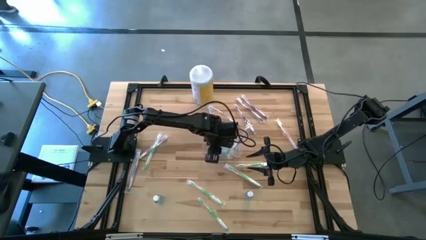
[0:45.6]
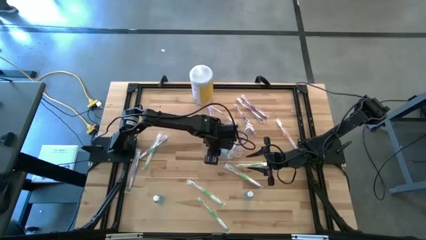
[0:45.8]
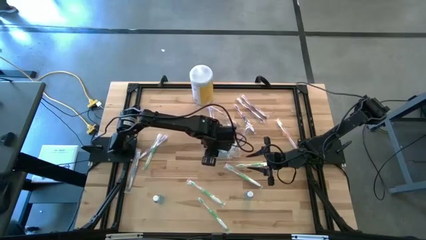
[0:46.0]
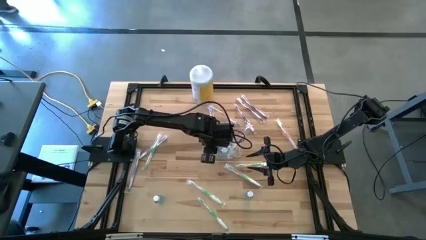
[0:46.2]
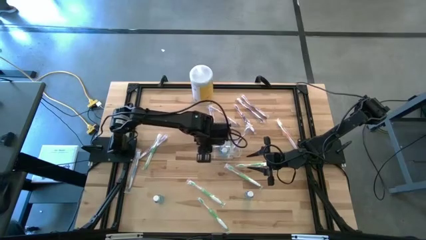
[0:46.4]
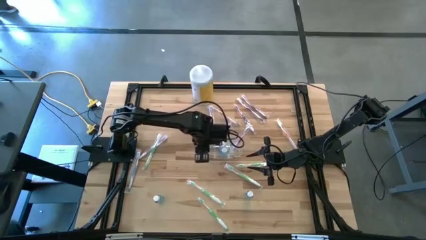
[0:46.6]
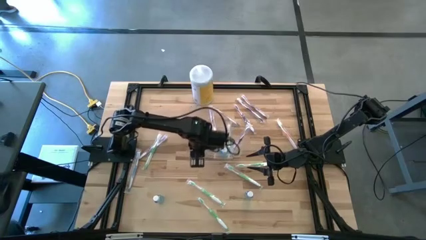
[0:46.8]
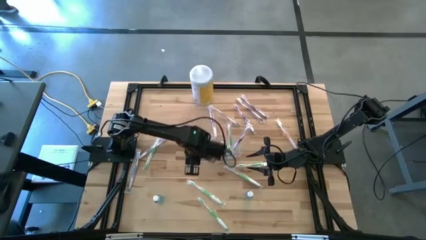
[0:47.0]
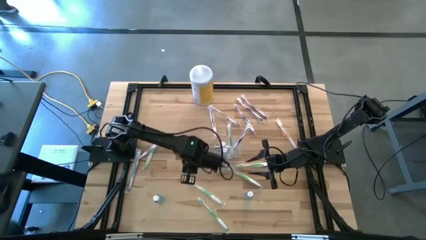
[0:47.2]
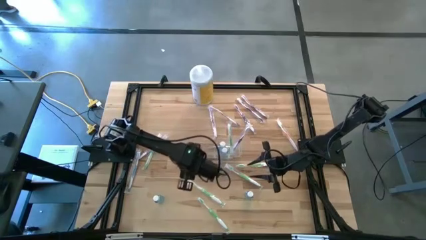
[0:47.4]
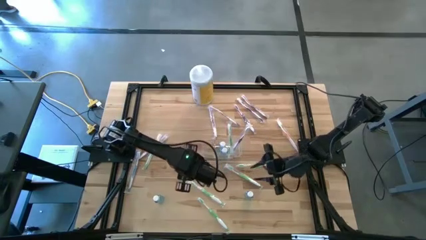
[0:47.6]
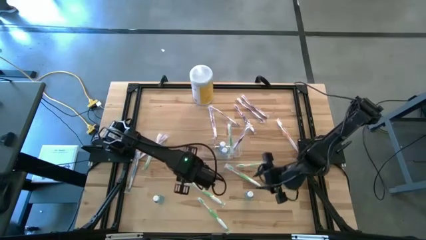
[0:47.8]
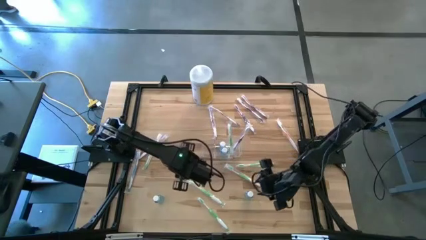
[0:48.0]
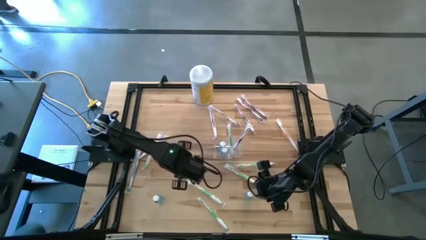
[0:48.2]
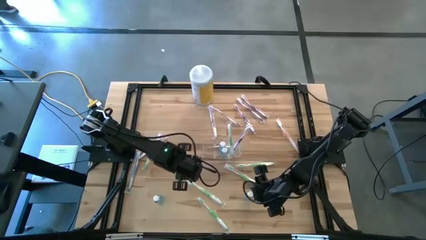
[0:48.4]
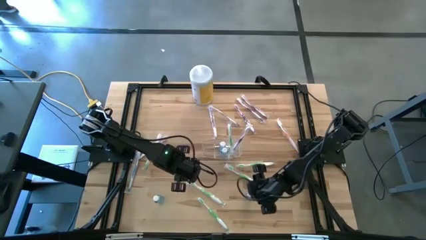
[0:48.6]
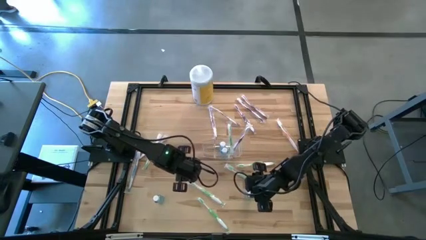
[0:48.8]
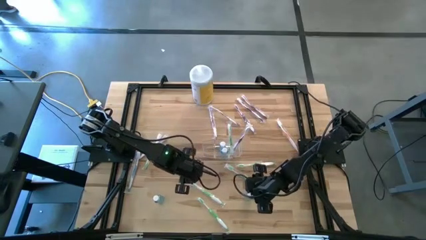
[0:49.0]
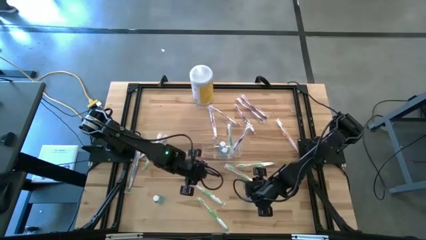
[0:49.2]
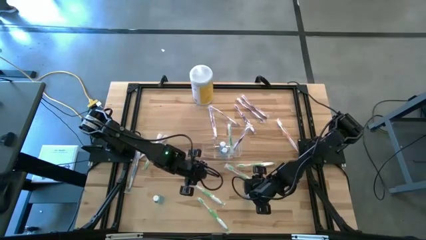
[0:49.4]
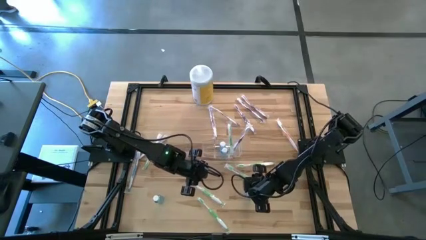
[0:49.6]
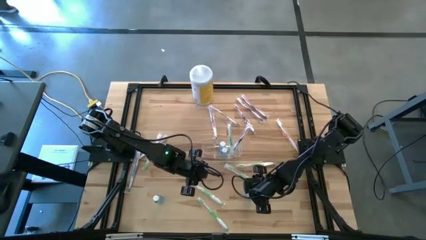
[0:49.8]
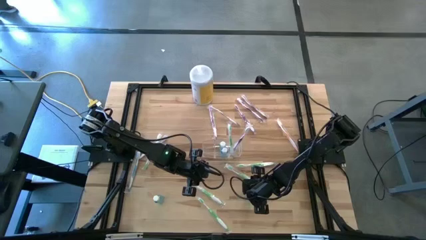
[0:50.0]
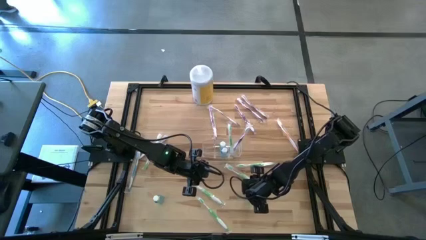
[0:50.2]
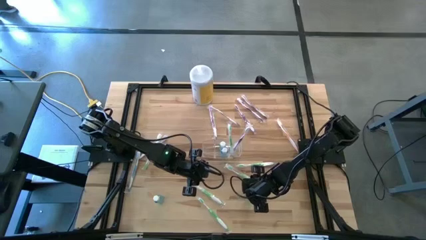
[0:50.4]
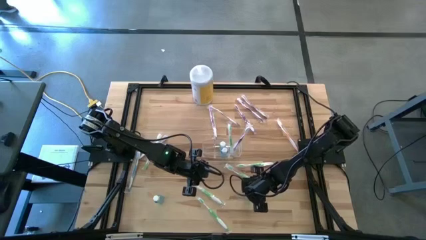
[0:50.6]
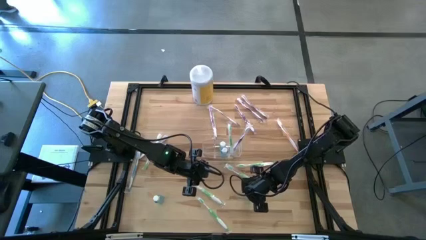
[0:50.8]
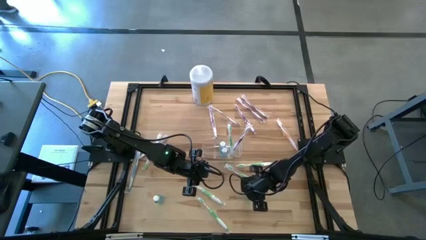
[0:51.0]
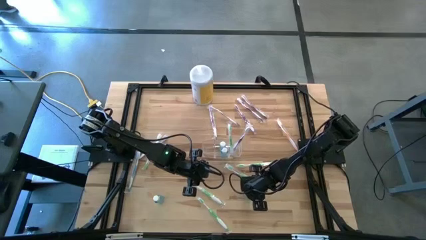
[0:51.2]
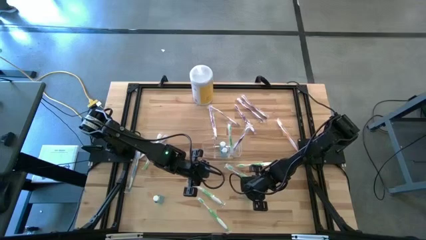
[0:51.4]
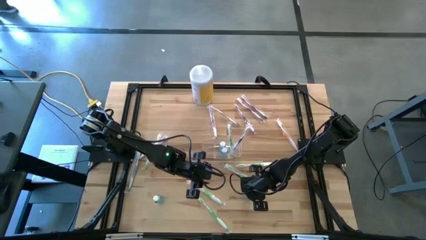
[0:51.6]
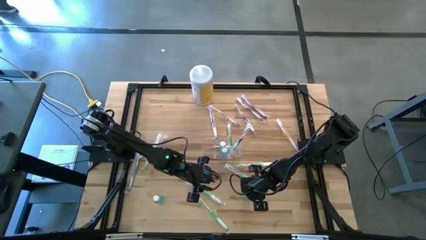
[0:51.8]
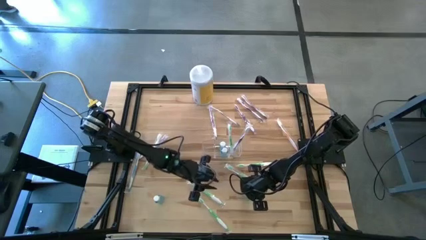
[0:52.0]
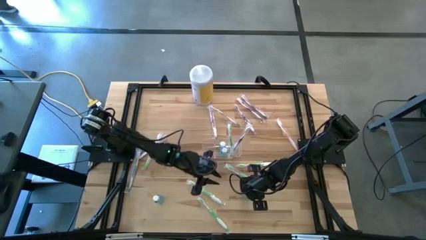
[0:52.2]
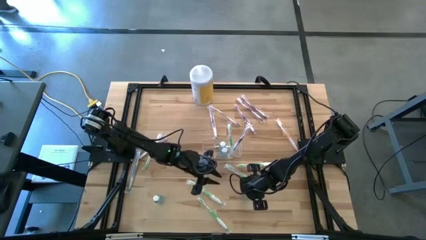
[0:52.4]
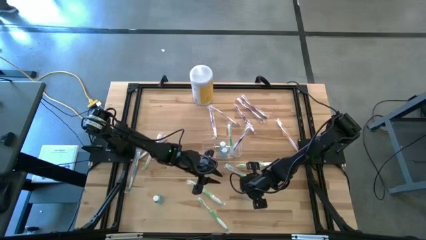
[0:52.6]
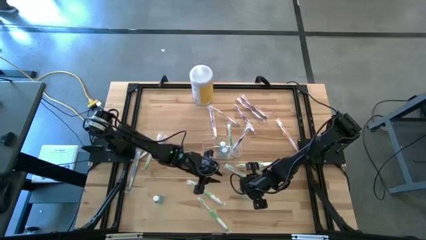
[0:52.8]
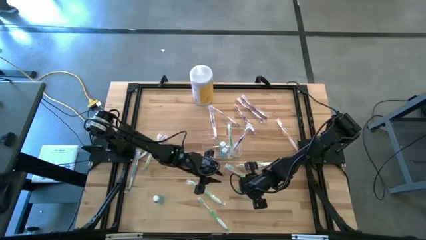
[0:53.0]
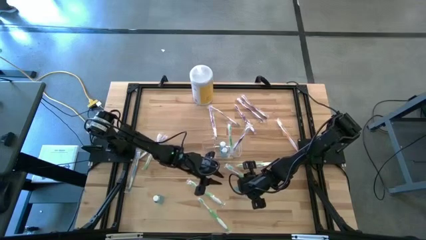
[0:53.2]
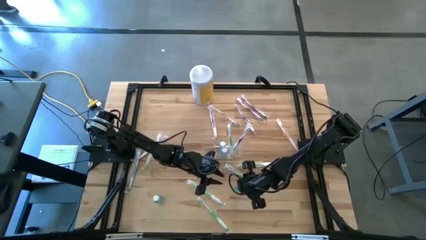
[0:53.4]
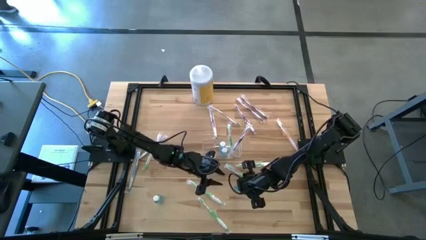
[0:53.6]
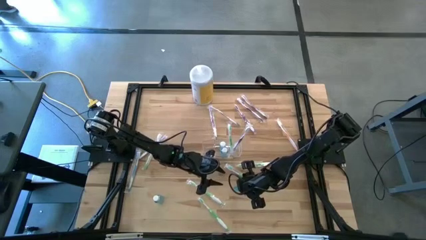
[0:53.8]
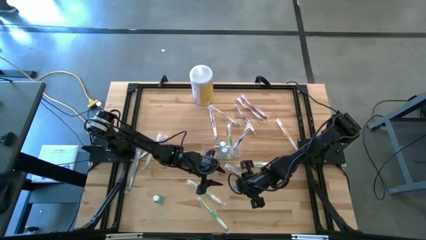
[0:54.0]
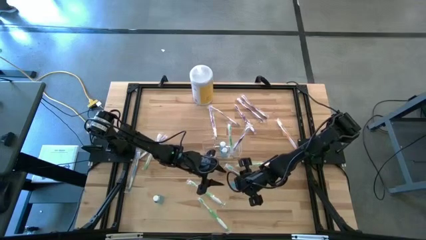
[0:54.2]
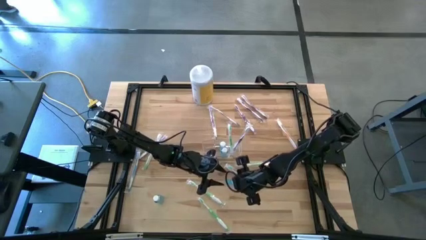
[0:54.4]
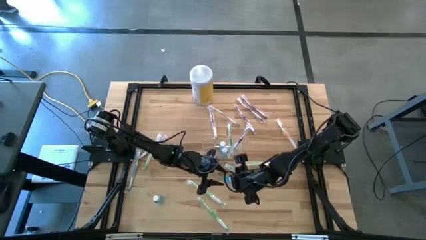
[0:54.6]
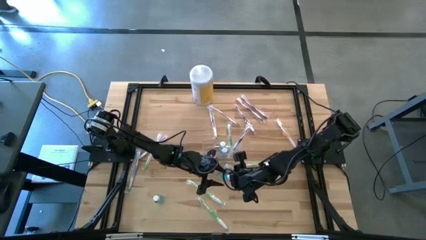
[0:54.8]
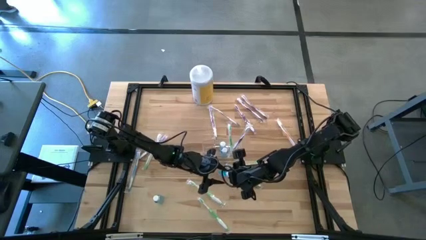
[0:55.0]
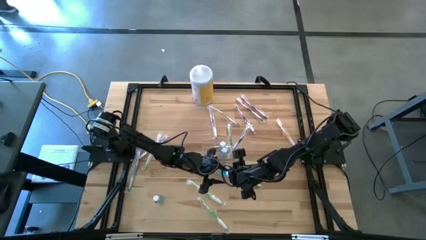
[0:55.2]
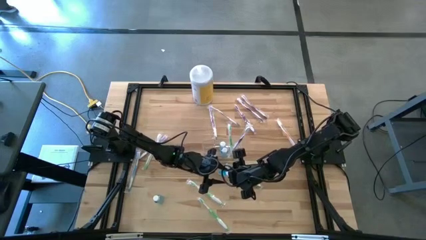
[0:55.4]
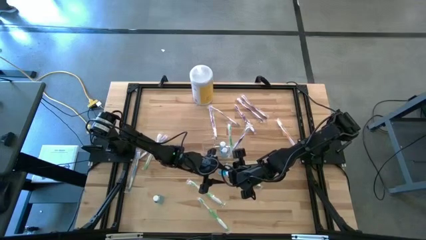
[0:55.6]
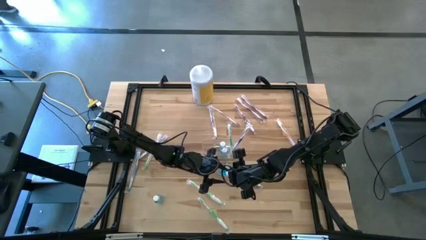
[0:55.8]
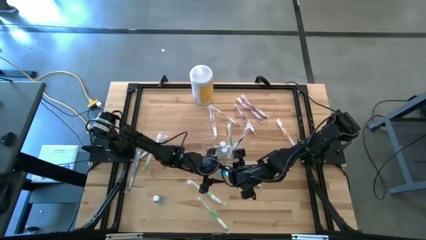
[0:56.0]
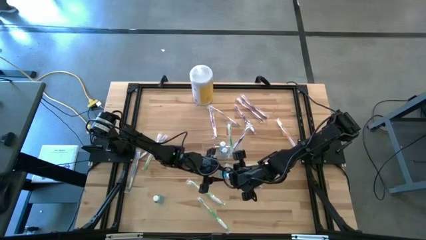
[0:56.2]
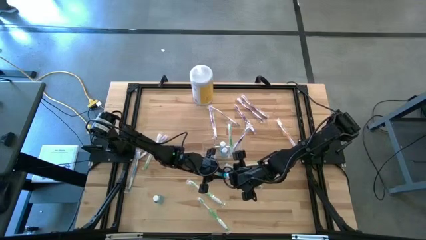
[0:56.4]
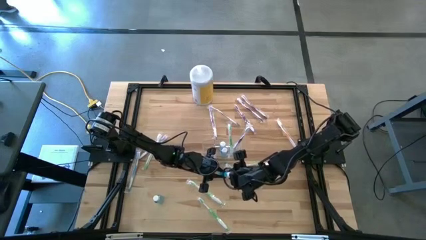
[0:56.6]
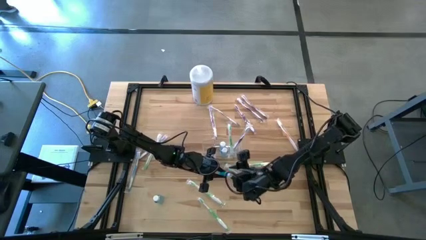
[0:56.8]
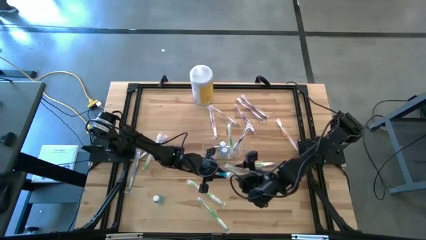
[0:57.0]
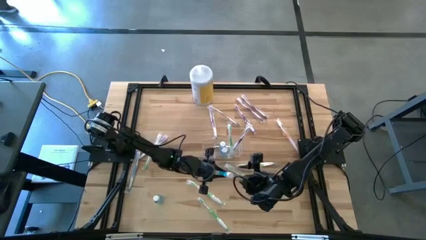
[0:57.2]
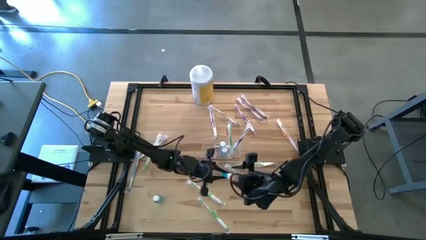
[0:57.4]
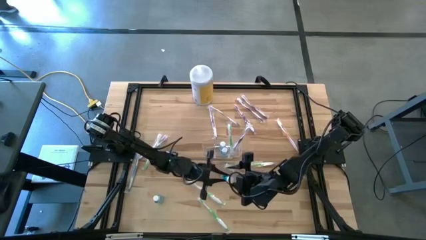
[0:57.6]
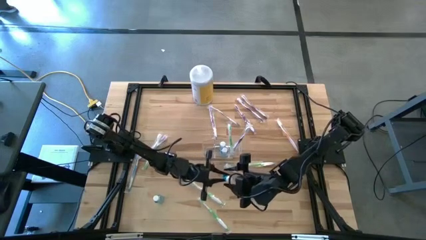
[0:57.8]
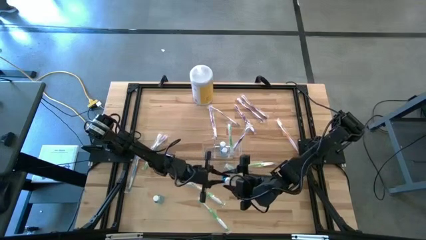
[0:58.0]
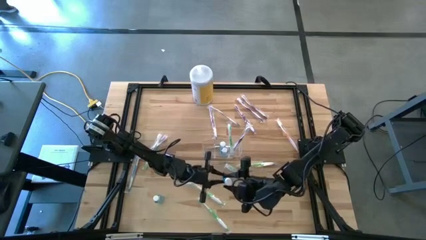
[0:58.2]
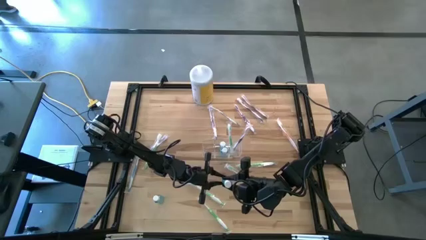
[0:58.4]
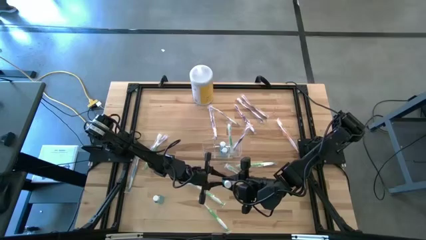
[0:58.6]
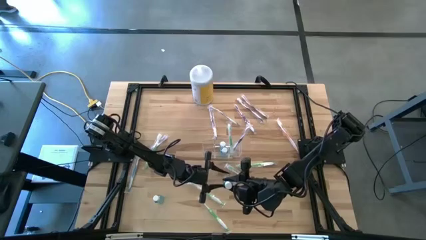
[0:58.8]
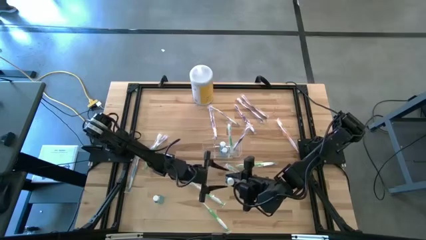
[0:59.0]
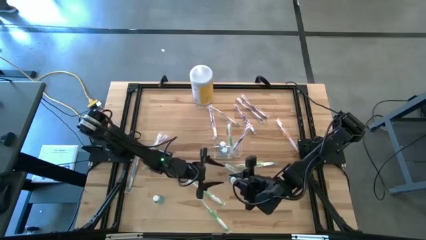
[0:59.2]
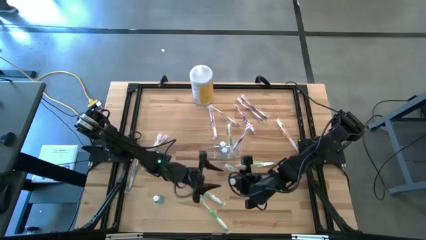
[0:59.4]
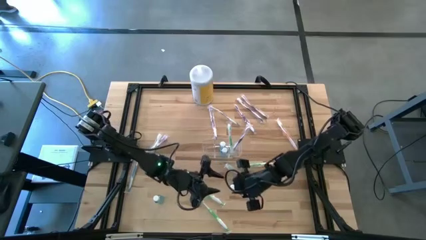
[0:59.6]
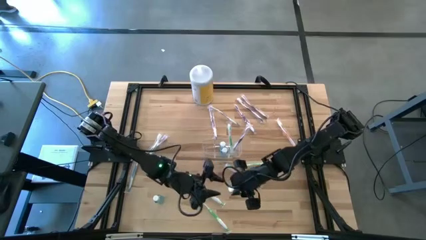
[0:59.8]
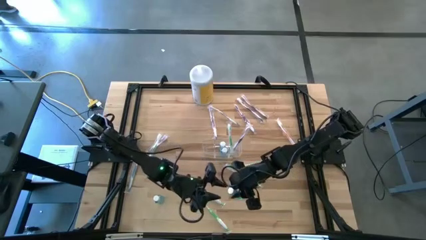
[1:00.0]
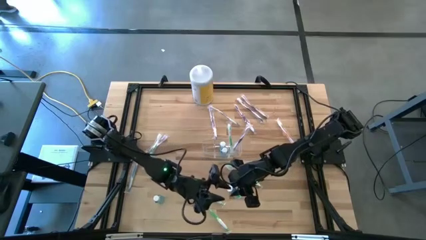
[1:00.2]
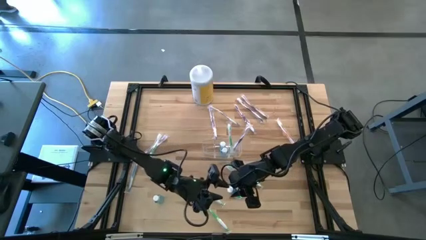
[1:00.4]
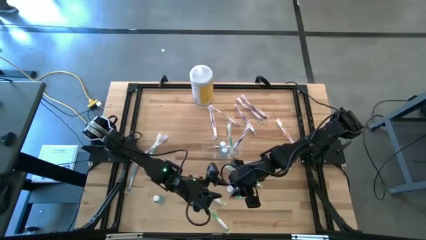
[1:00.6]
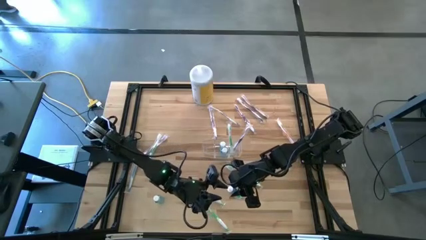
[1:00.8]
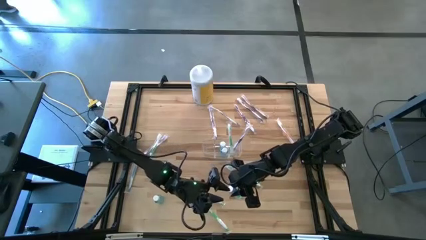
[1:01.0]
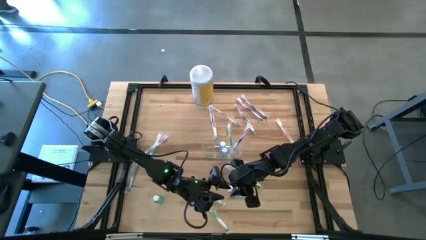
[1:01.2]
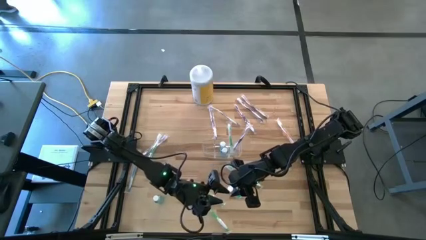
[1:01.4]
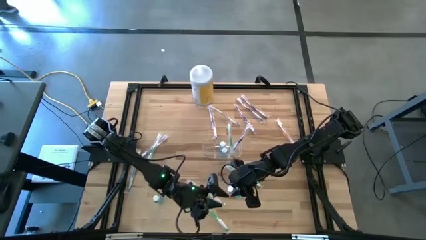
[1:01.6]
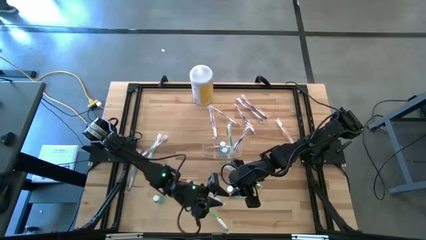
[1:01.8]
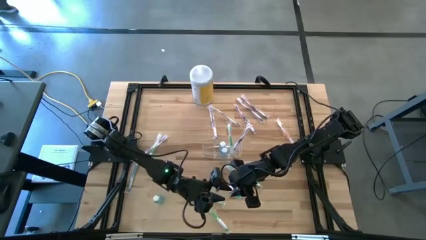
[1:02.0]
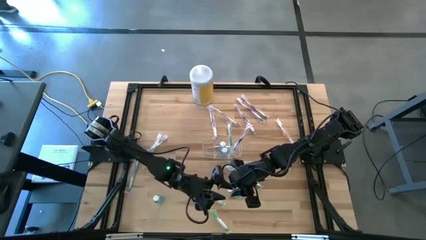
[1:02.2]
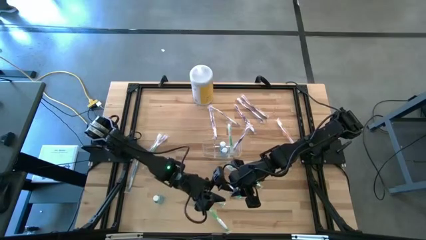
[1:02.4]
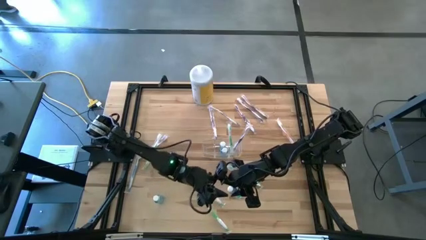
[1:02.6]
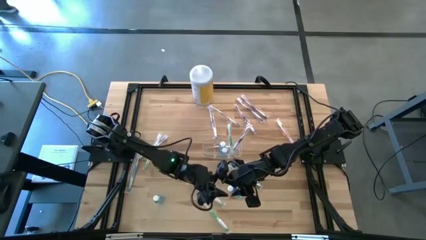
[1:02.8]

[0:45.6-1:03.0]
Task: Pick & Place toothbrushing station
Put the mouthwash bottle into the transparent organizer
